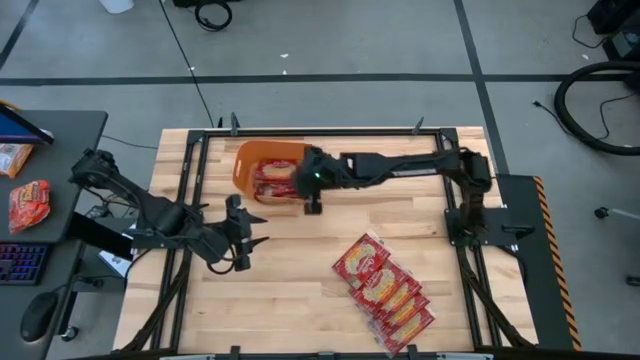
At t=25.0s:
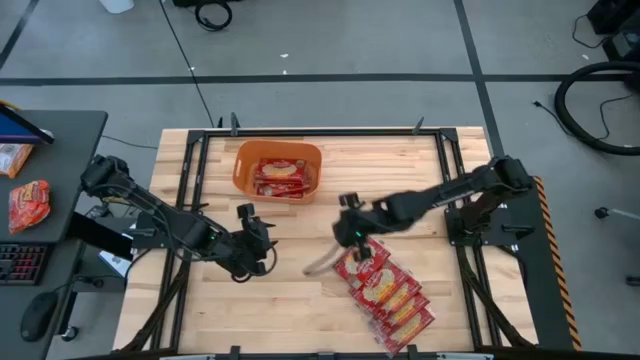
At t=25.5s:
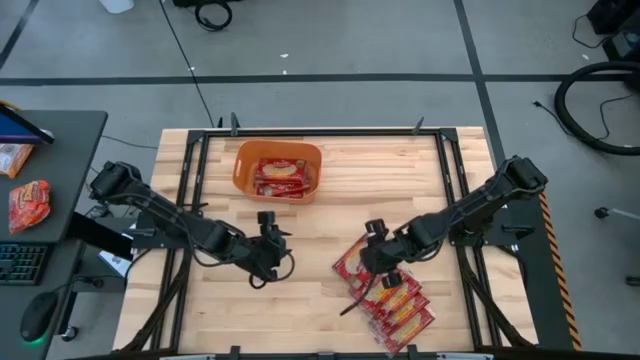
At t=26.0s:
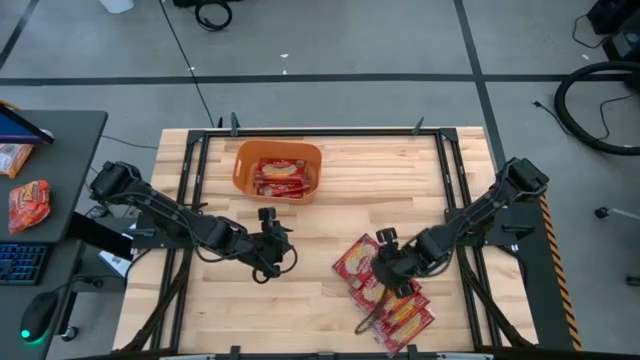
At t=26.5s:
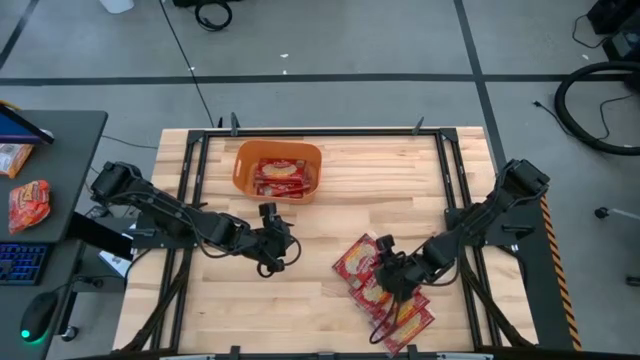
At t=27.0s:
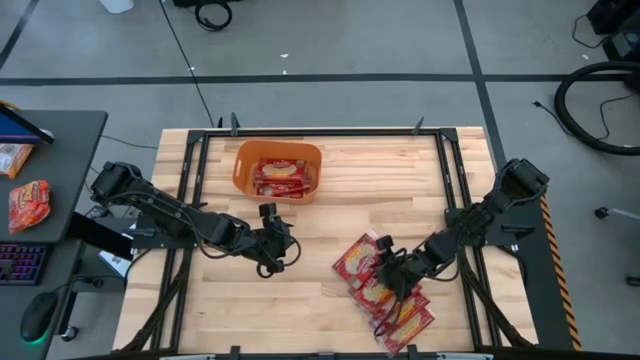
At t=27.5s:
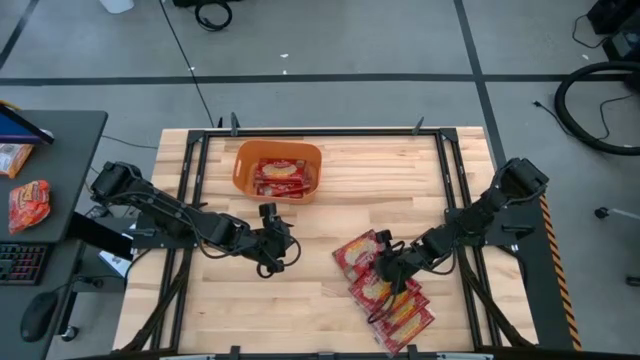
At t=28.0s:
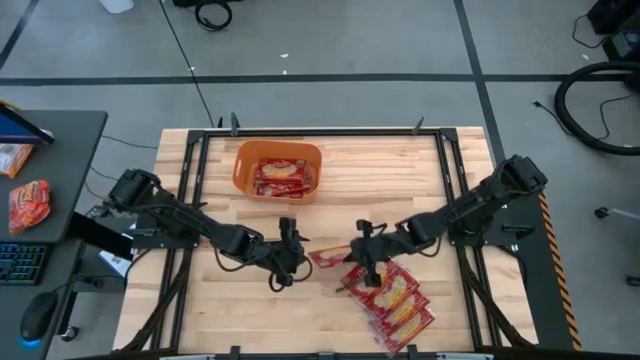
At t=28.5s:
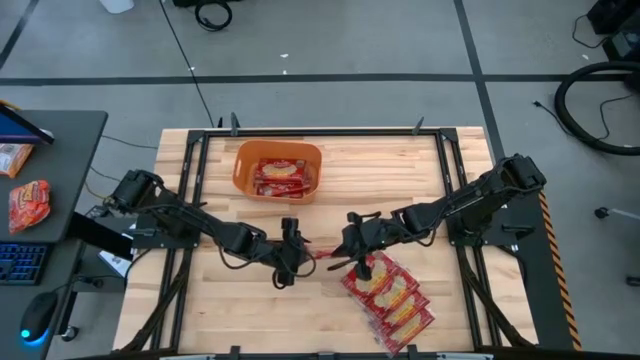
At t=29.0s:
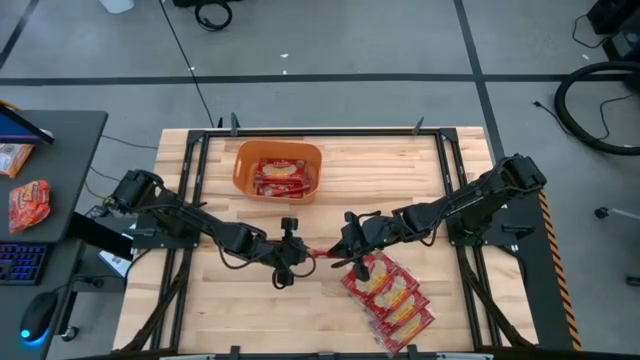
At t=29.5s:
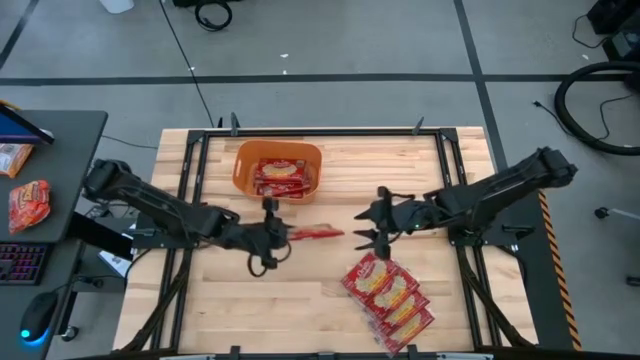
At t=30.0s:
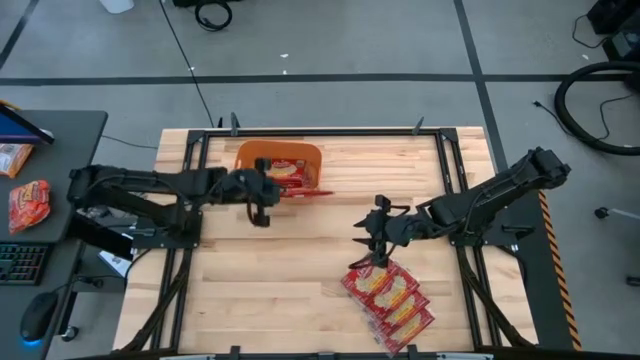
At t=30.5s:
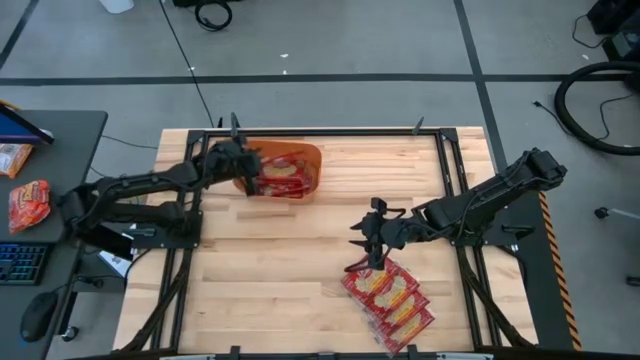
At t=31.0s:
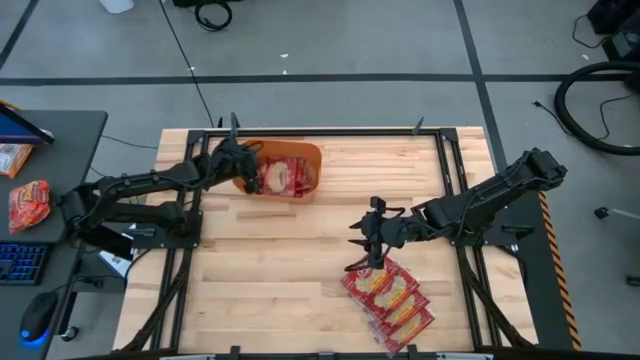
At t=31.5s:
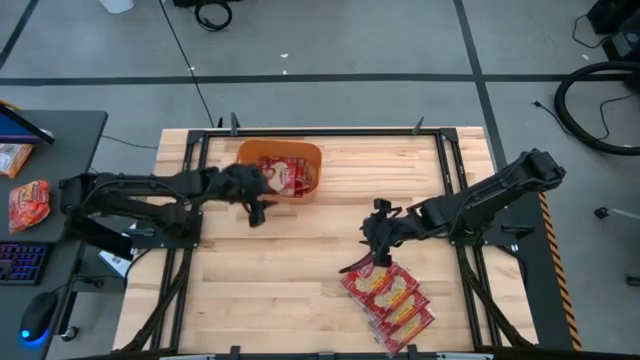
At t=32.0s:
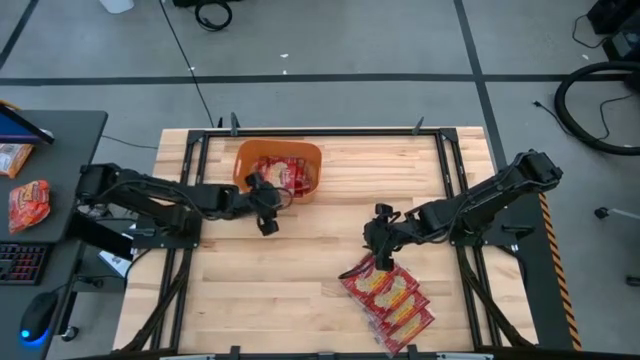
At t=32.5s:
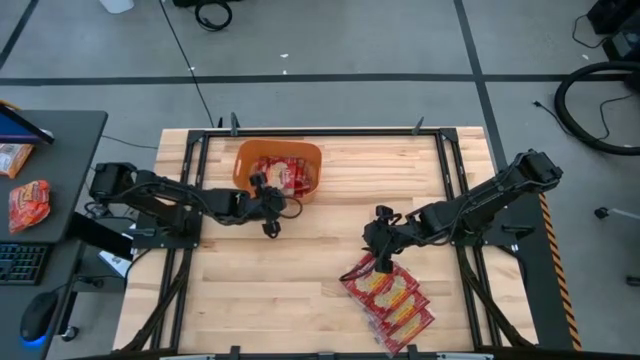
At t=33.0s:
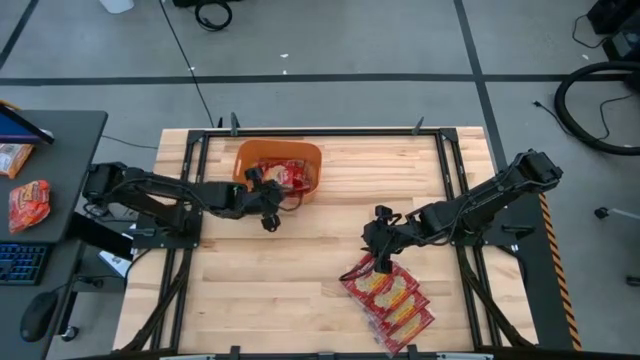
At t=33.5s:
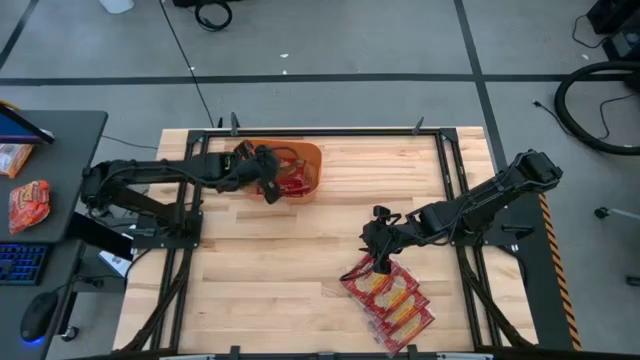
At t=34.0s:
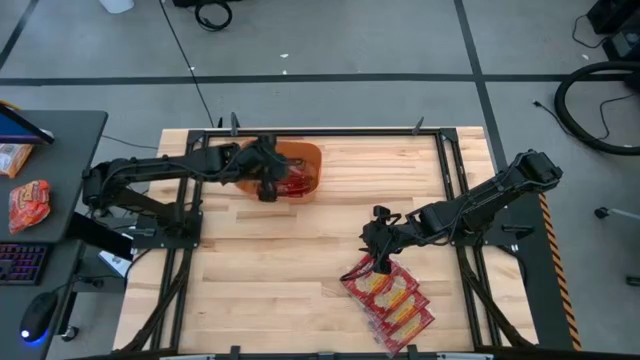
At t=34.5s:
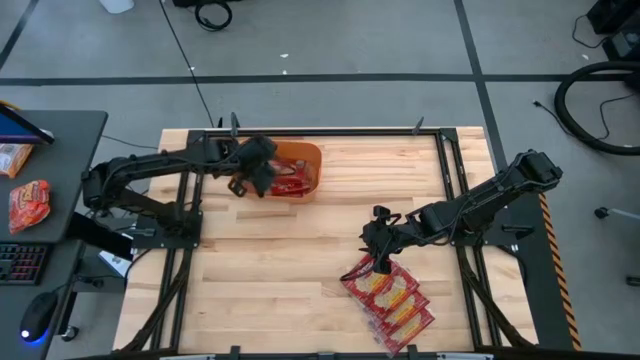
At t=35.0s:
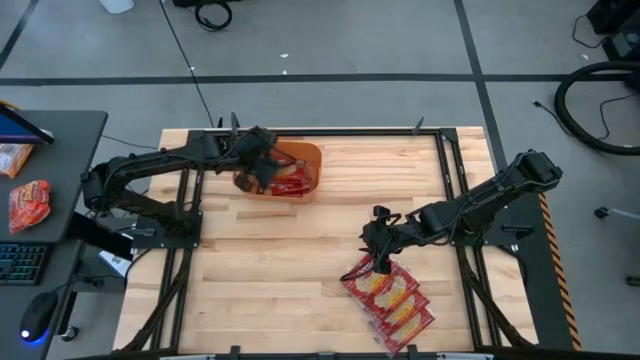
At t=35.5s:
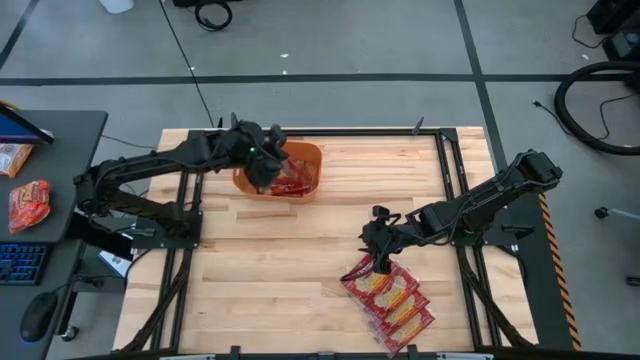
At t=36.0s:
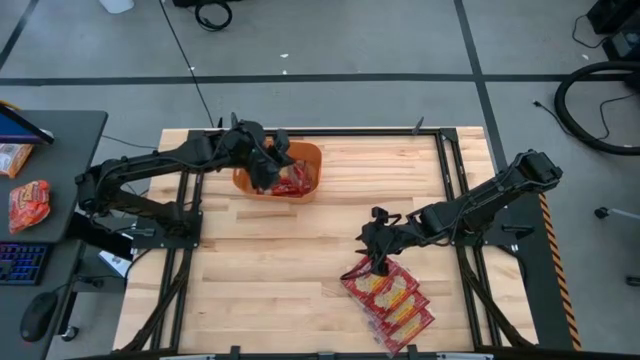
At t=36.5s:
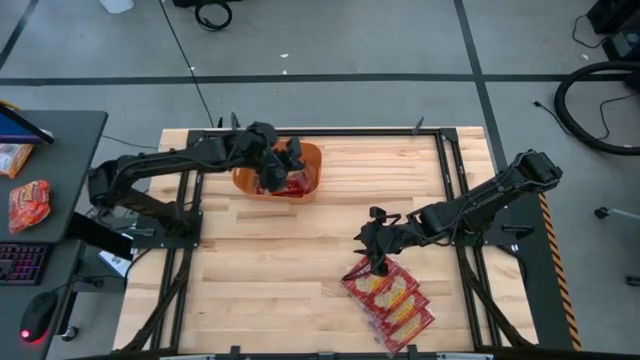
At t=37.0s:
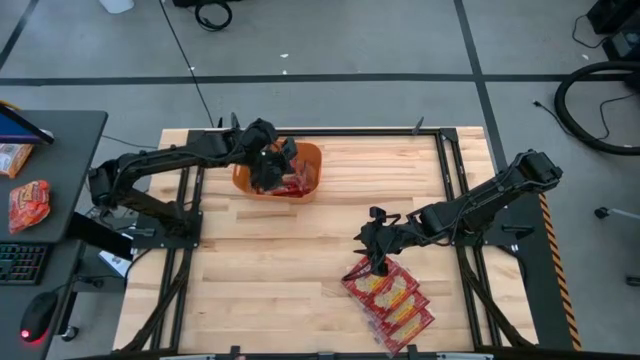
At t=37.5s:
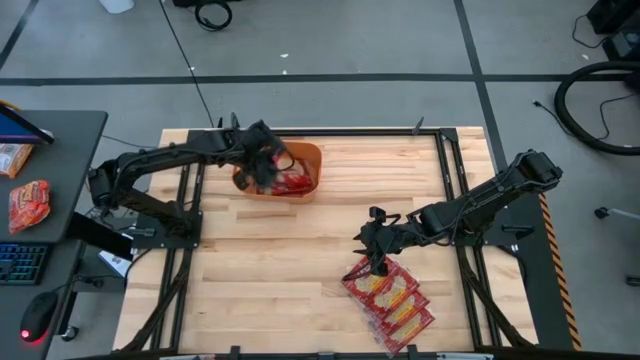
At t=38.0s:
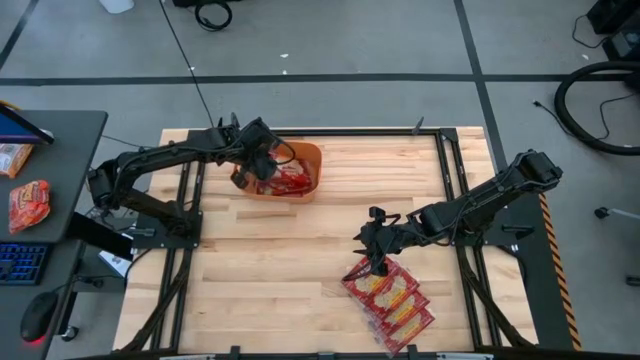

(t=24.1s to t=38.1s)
Task: Sort popcorn bags into baskets
Put the popcorn bag into the orange bin

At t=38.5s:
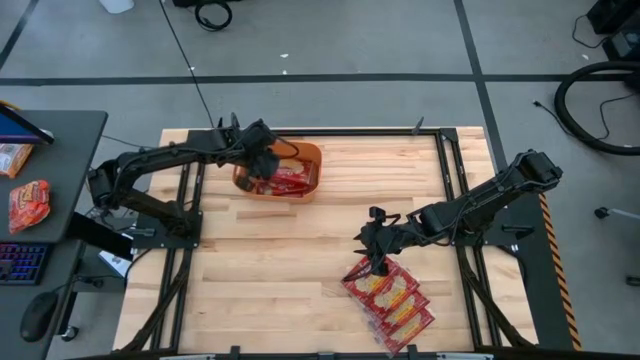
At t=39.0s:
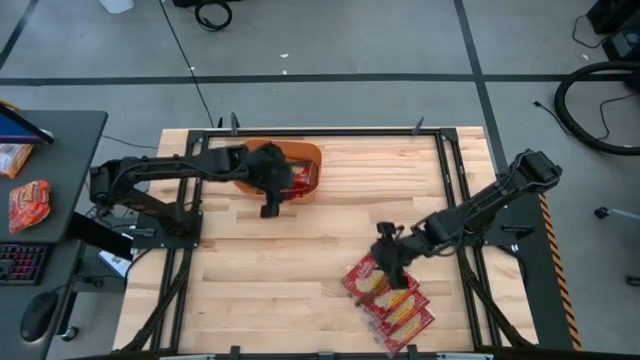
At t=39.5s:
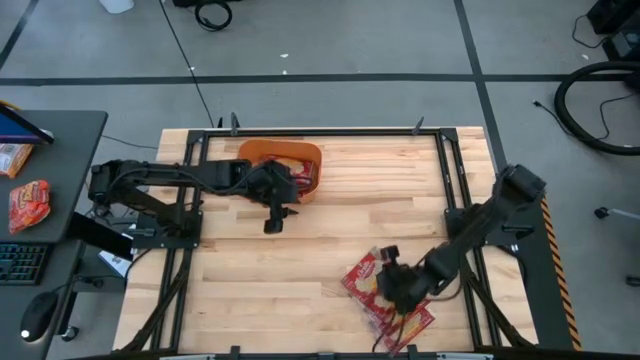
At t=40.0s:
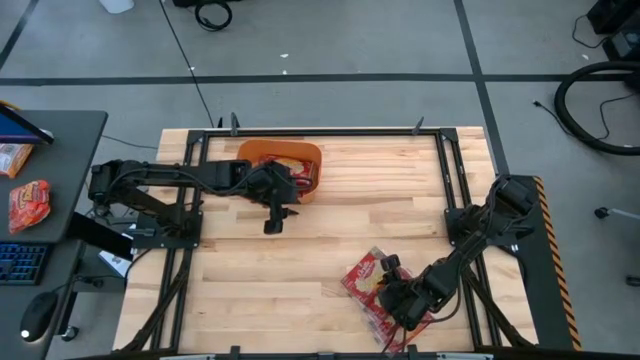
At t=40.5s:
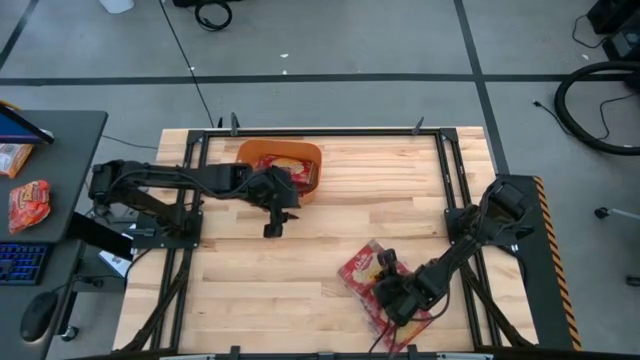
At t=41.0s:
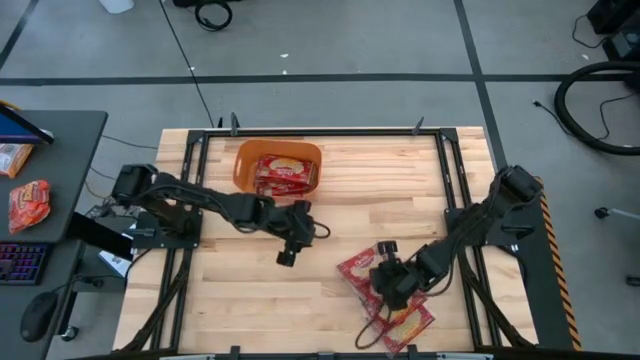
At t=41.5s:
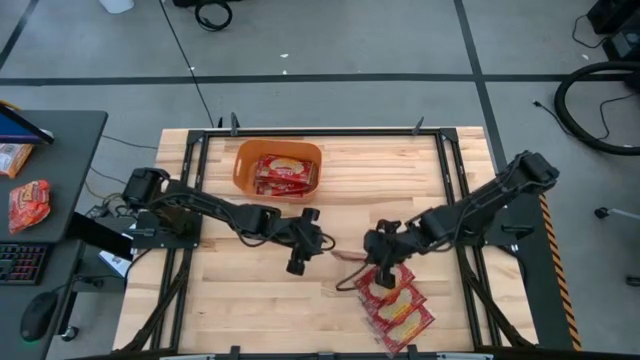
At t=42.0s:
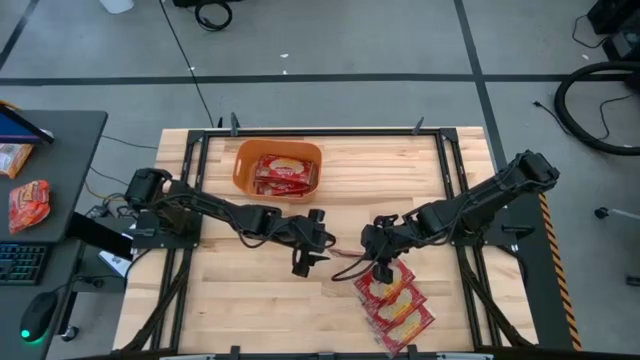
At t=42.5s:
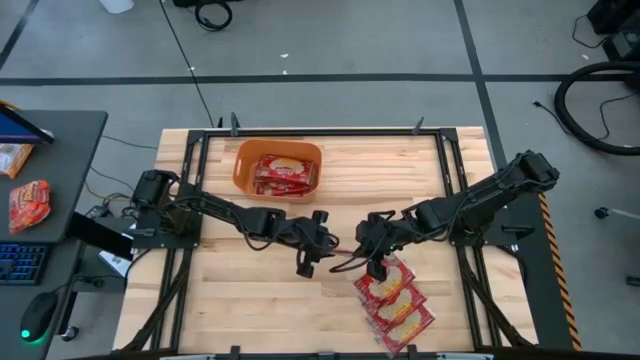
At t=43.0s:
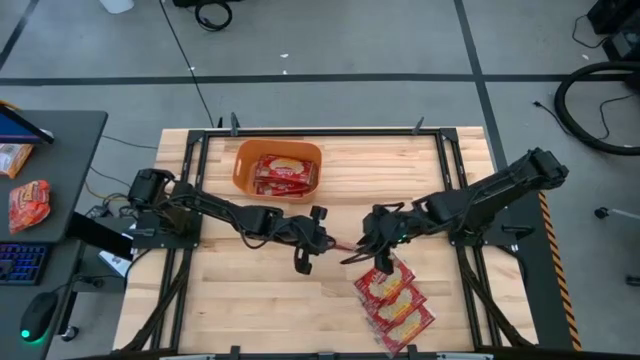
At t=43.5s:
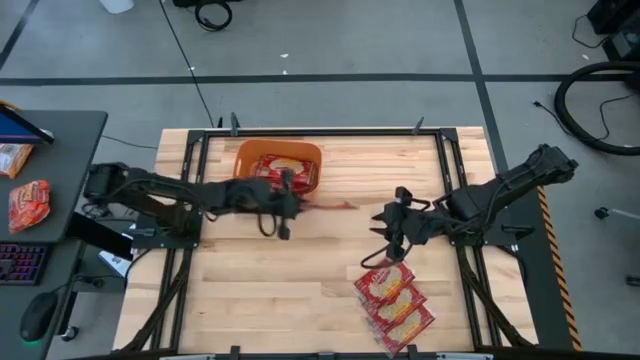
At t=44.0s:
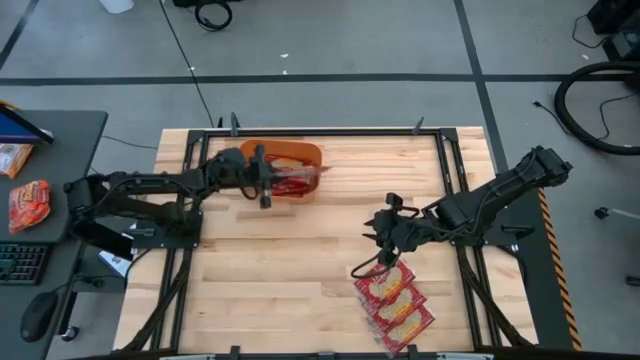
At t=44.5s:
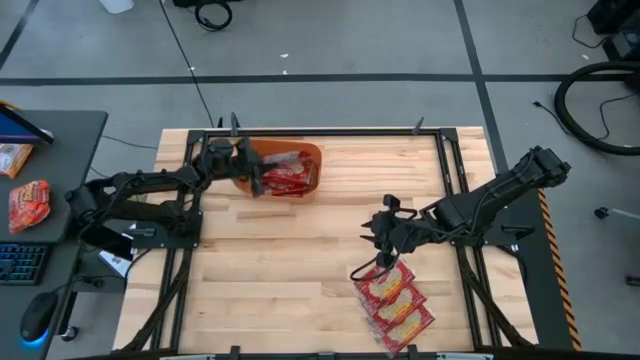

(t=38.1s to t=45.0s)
Put the popcorn bag into the orange bin
